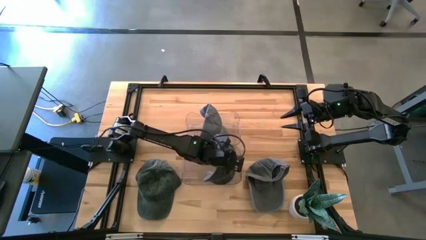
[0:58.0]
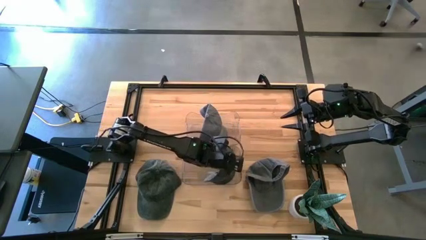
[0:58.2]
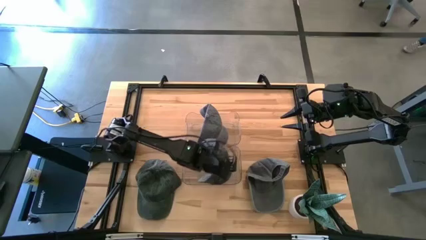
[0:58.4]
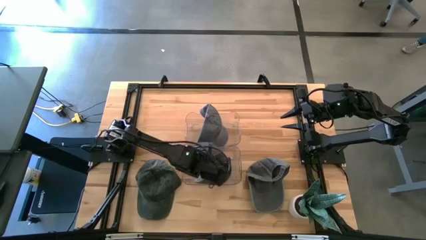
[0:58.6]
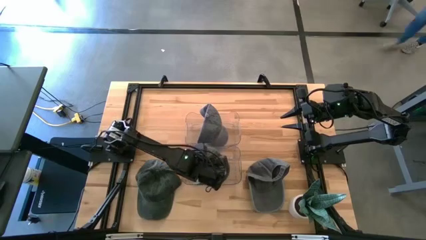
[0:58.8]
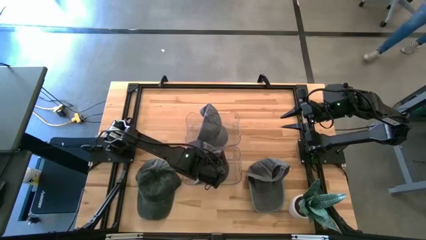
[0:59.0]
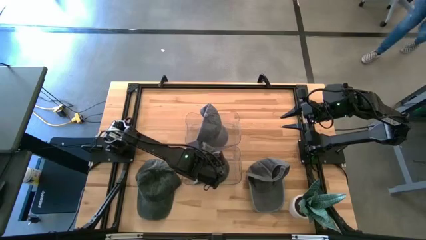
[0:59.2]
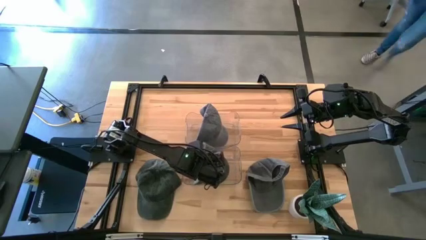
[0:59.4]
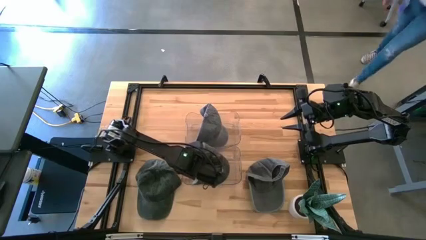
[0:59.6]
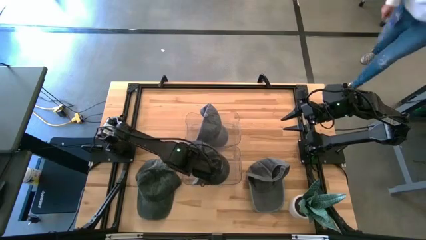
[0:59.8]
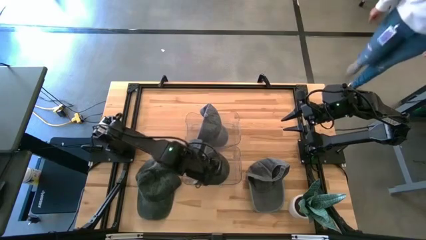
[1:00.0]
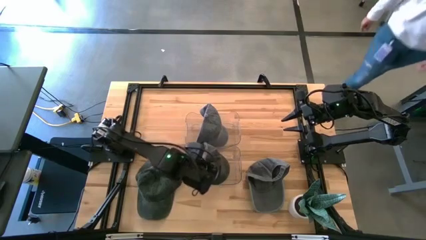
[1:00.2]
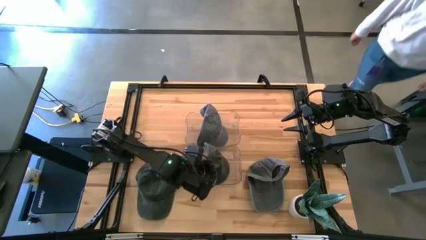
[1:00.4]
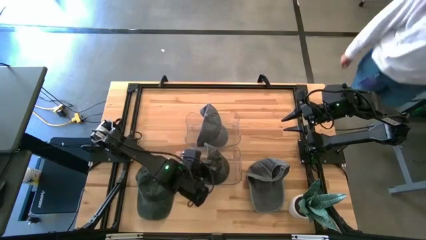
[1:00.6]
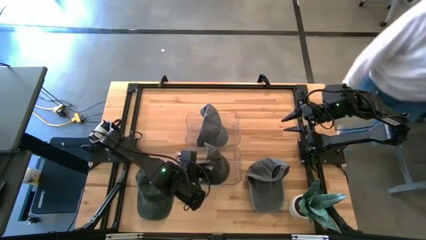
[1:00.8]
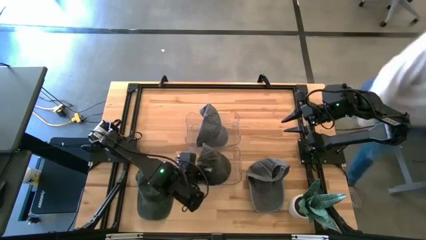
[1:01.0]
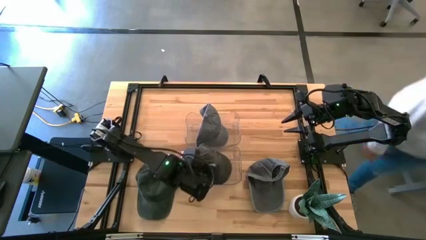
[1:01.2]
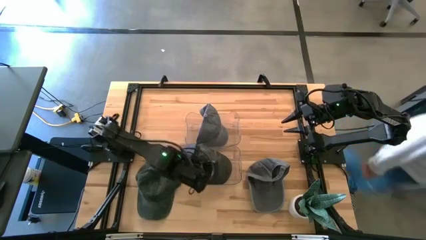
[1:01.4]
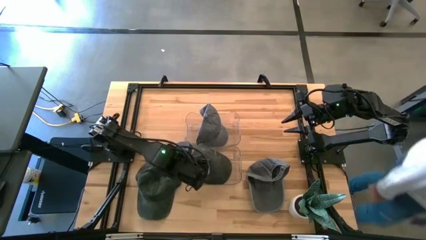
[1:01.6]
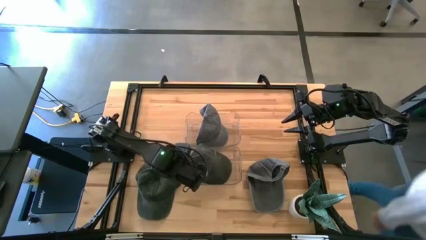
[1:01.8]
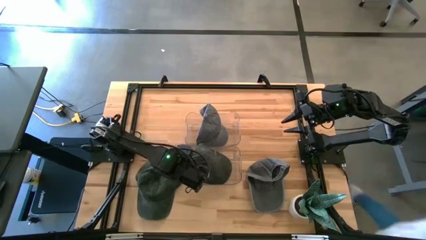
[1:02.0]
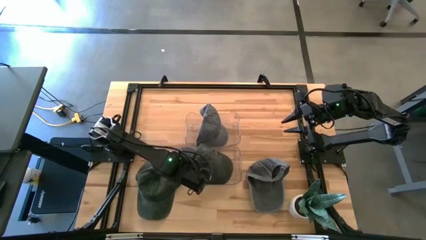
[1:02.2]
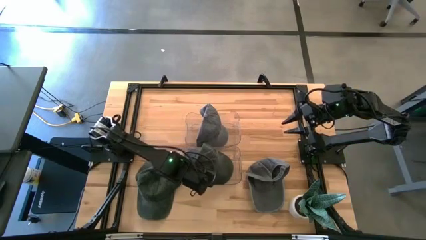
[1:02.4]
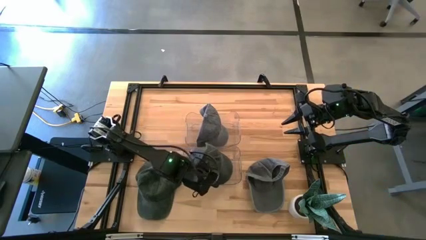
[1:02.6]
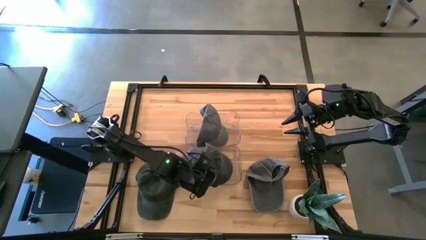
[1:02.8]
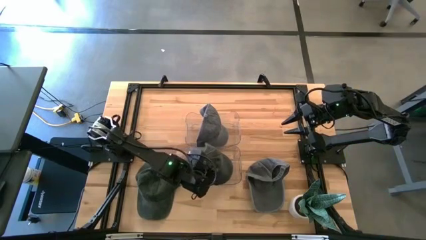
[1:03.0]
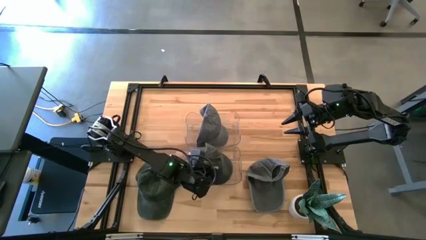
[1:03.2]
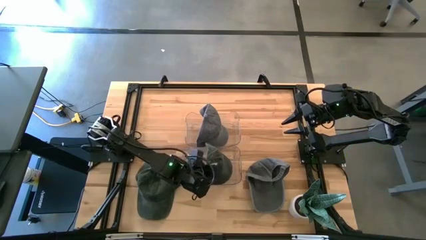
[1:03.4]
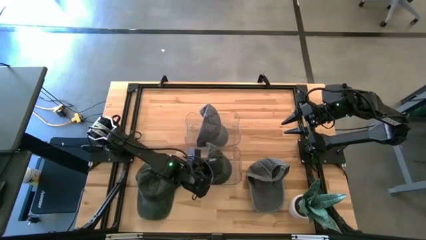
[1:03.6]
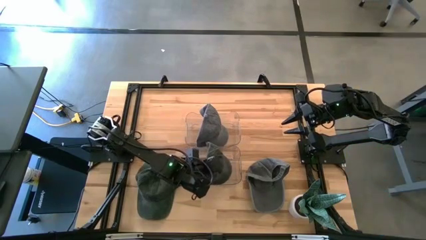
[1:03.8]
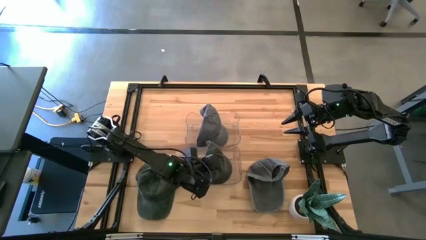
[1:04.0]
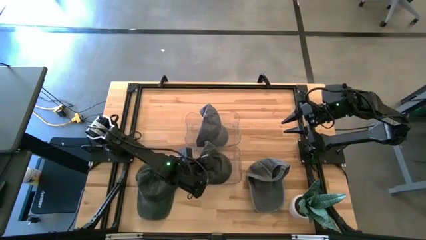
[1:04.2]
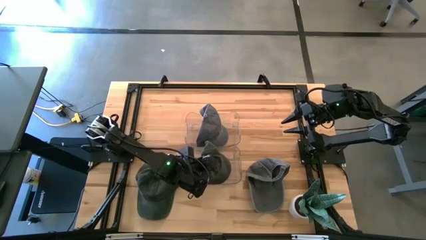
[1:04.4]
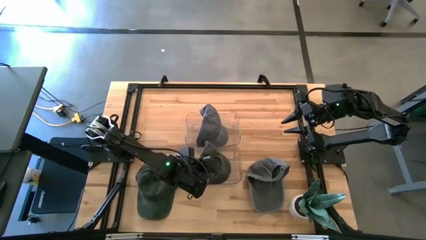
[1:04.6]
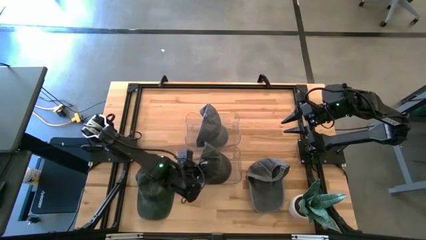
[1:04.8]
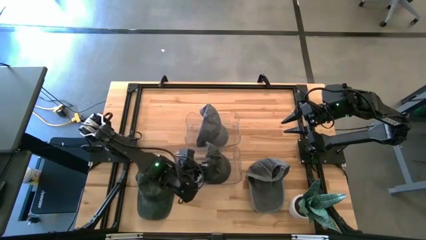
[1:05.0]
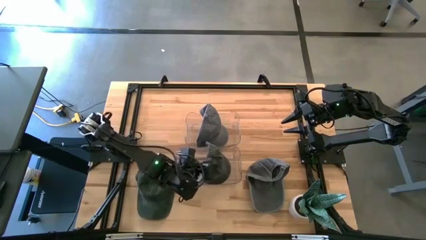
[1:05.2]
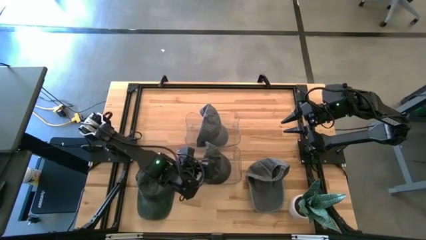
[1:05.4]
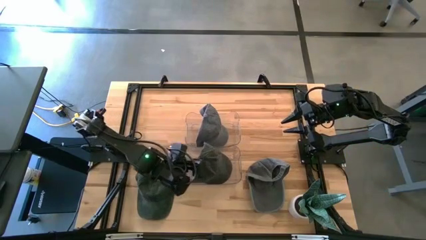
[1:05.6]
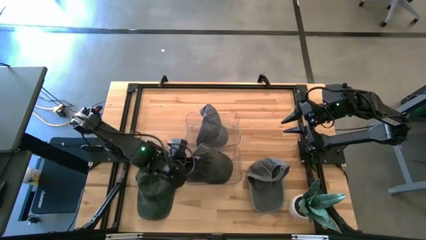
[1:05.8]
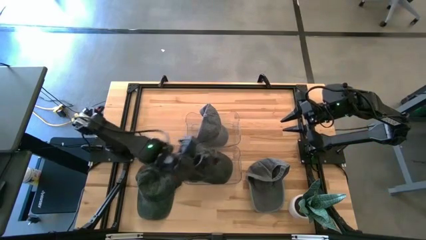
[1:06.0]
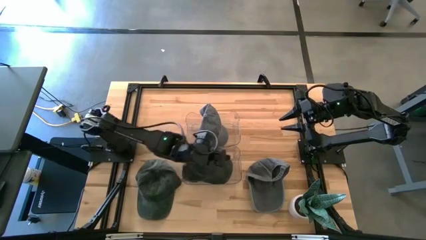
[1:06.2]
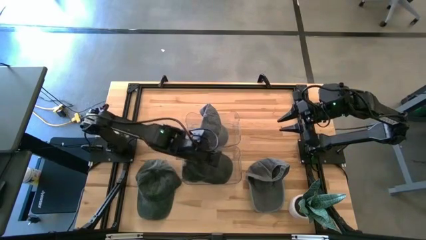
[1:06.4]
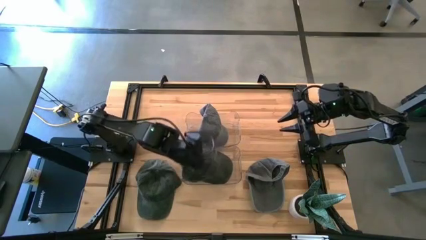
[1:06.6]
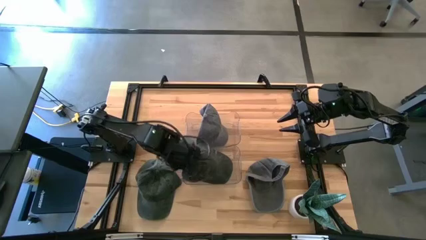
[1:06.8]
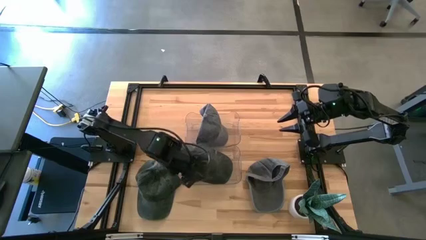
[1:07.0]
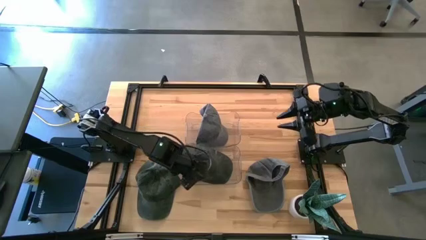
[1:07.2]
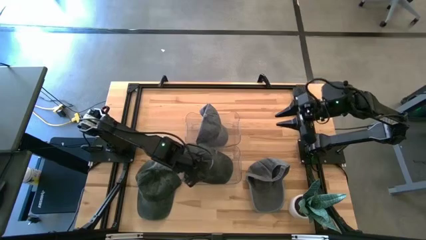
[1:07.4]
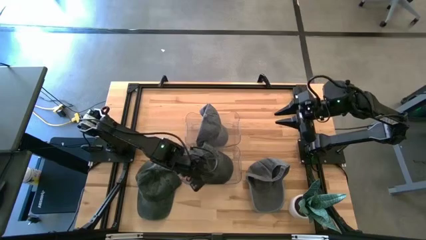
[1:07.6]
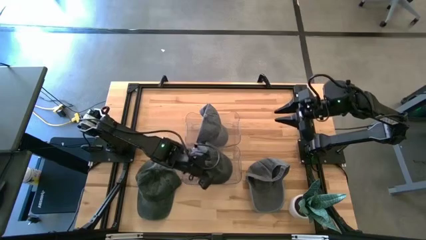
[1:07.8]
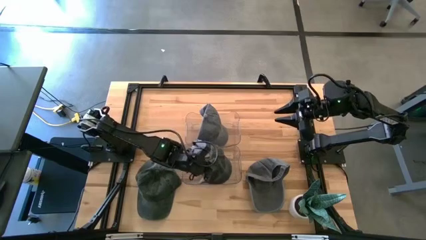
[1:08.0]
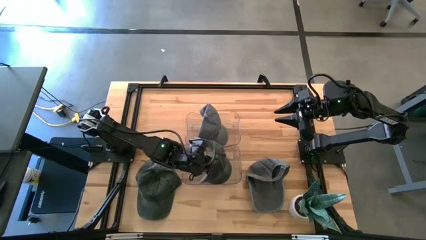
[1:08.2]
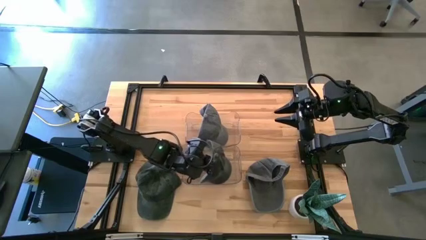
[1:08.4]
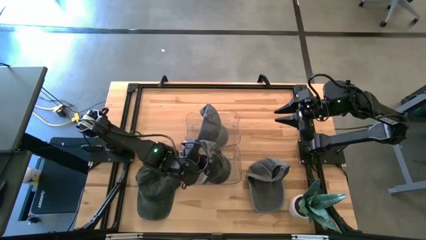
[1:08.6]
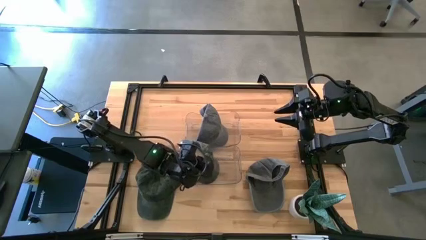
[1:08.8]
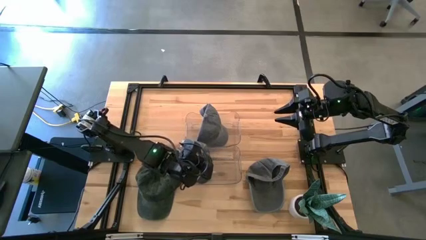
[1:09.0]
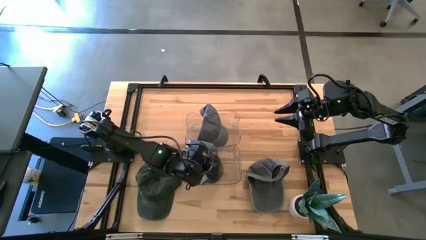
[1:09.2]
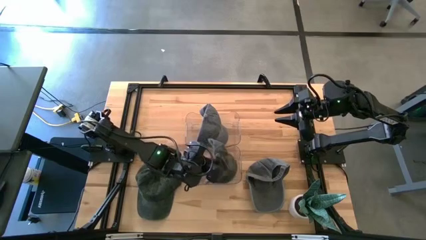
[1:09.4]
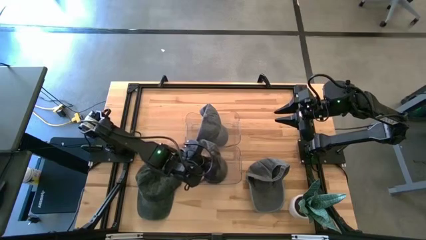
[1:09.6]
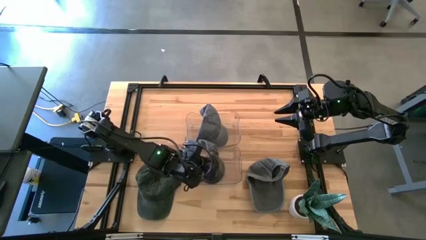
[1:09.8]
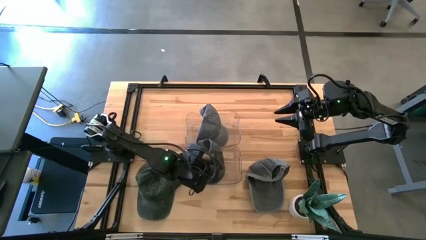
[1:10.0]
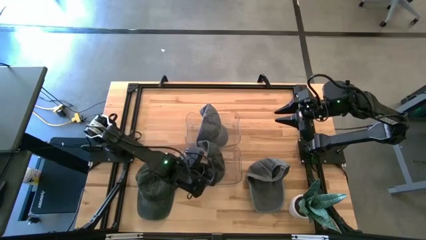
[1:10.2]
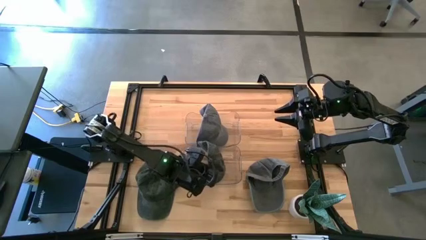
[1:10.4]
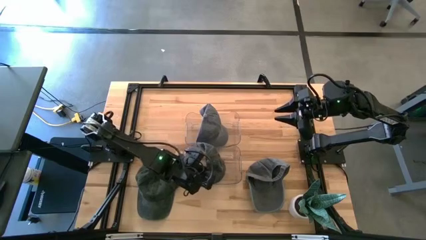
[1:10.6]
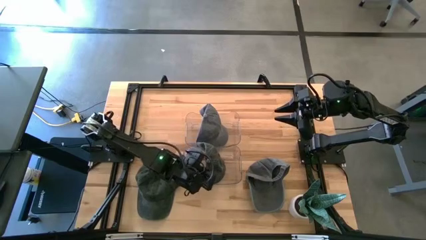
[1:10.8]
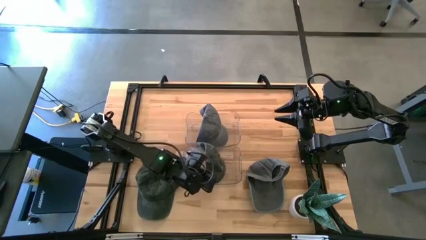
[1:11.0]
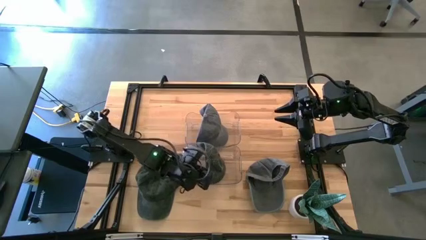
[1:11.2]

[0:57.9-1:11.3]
Task: Pick & Place hat
Put the top black cap into the bottom transparent bin

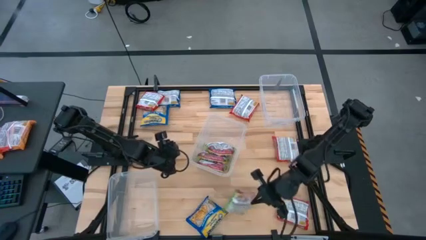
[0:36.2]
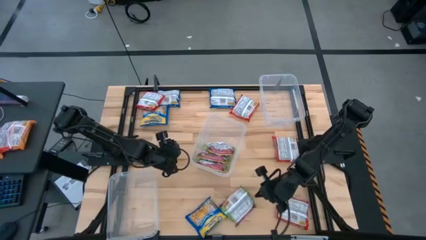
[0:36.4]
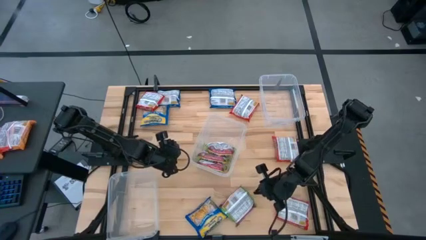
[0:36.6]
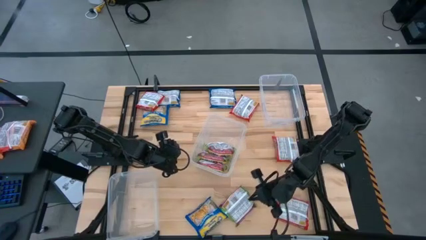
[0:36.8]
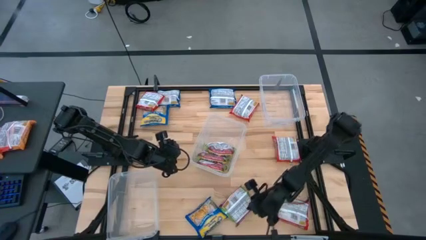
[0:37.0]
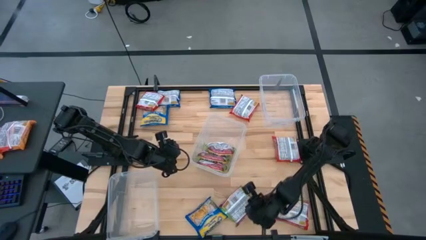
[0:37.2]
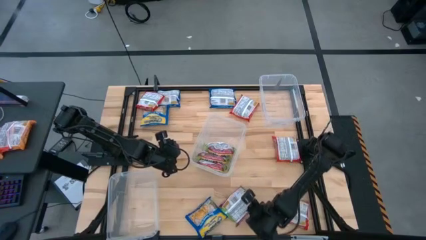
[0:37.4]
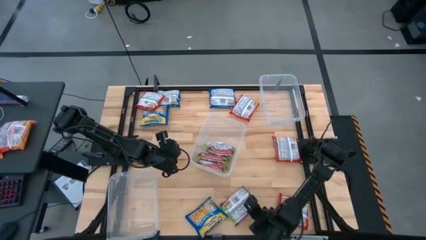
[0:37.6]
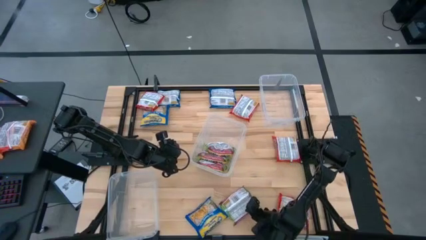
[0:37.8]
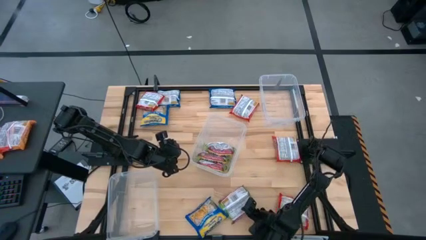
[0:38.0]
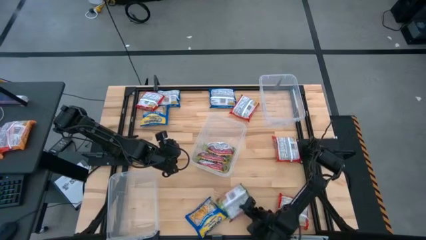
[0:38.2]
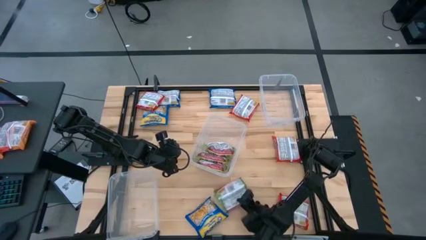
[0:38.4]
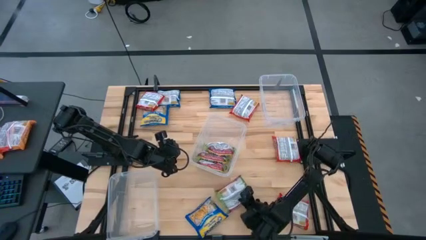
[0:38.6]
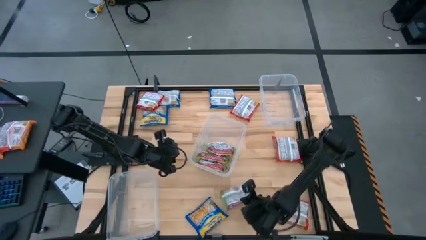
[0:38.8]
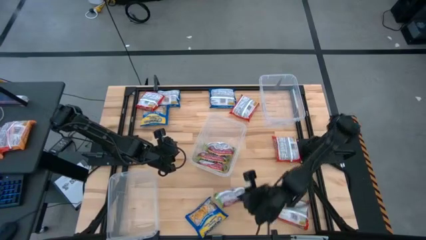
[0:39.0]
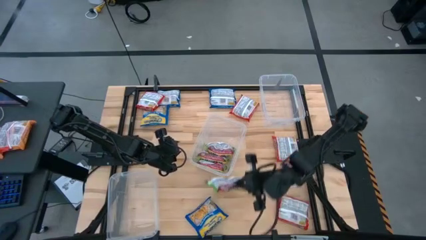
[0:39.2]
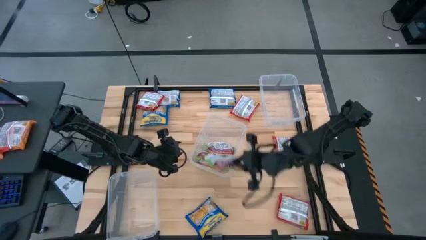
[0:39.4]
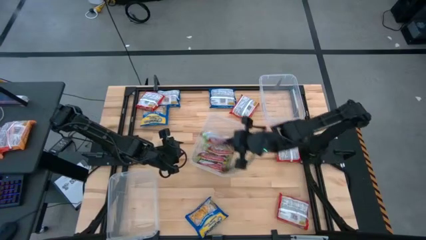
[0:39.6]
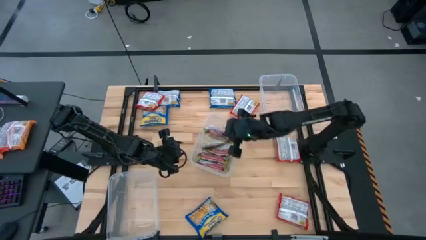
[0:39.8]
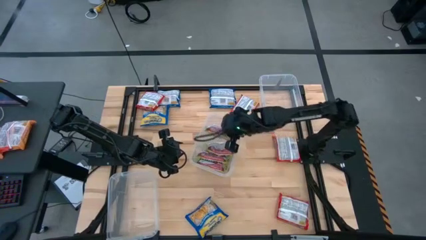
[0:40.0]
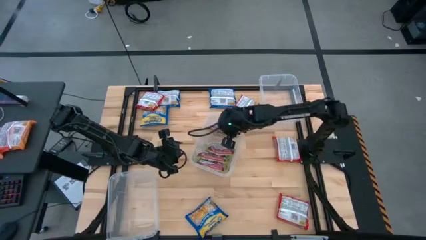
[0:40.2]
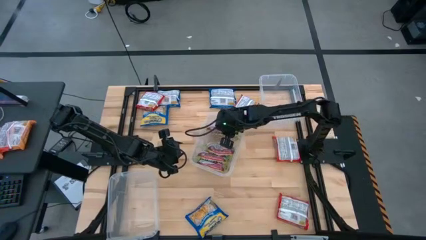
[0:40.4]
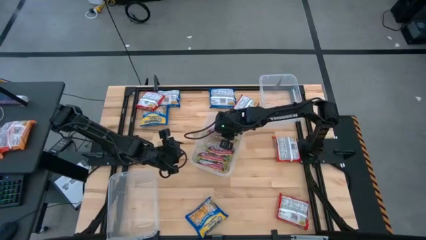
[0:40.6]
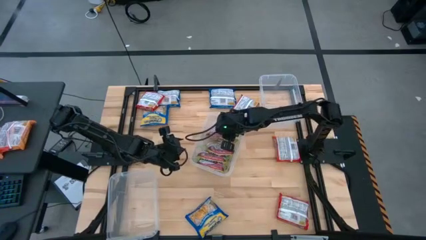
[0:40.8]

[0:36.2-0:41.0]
Task: Sort Maruchan noodles
Put the green noodle pack into the middle transparent container

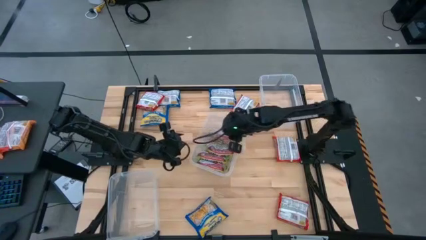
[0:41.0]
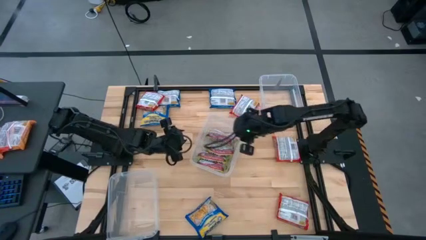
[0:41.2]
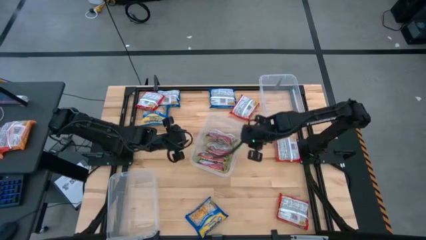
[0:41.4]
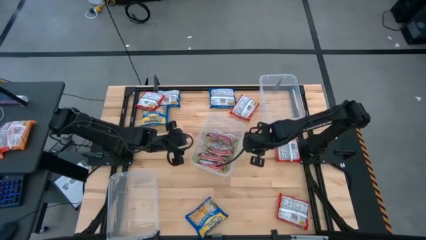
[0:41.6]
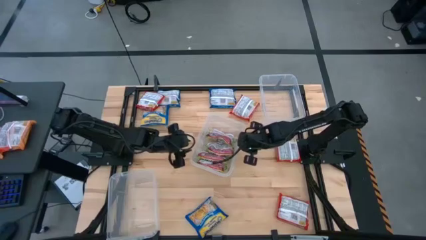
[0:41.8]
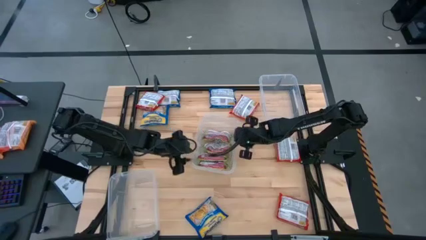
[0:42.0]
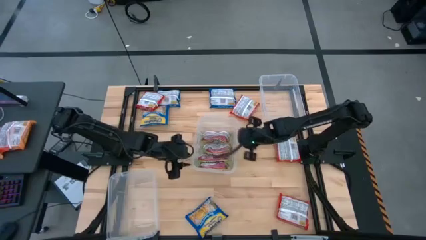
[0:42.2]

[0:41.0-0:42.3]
Adjust the middle transparent container
